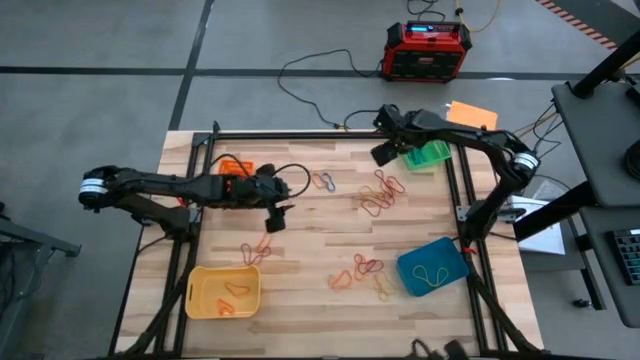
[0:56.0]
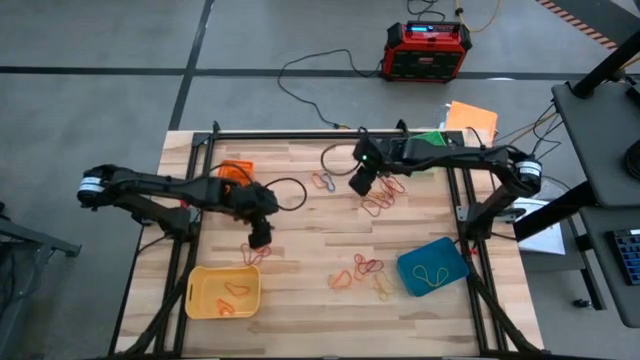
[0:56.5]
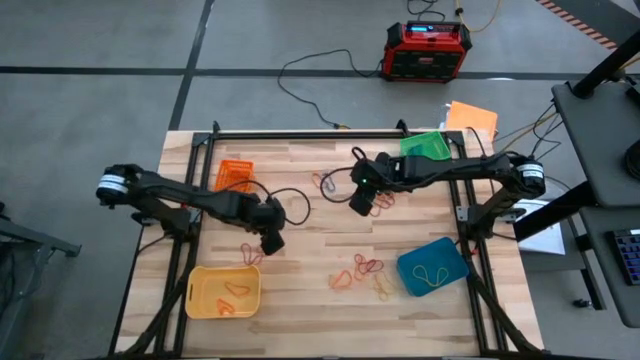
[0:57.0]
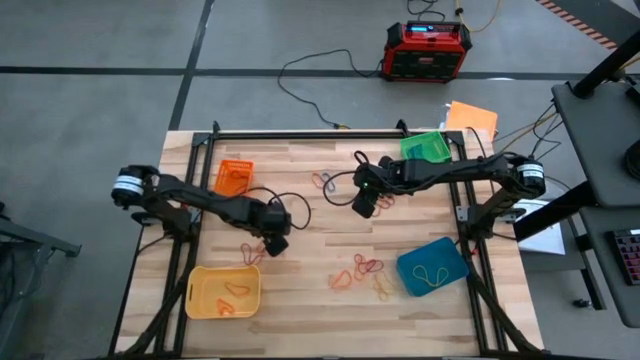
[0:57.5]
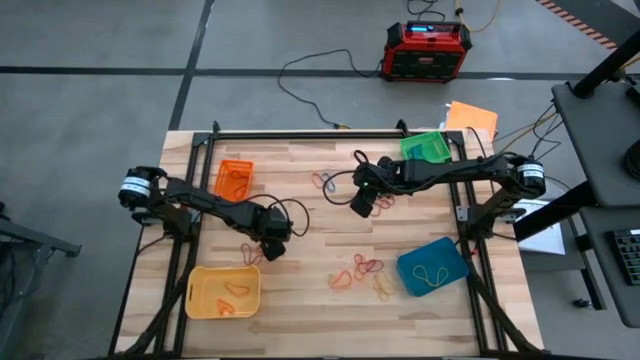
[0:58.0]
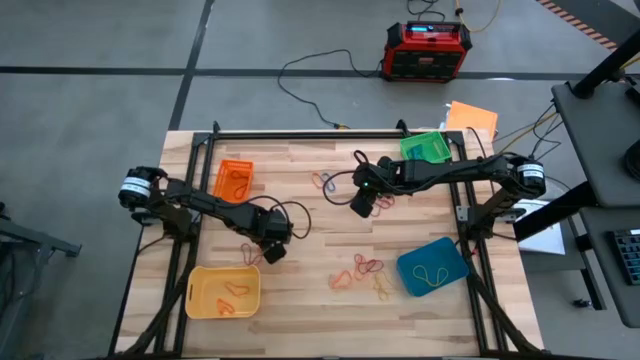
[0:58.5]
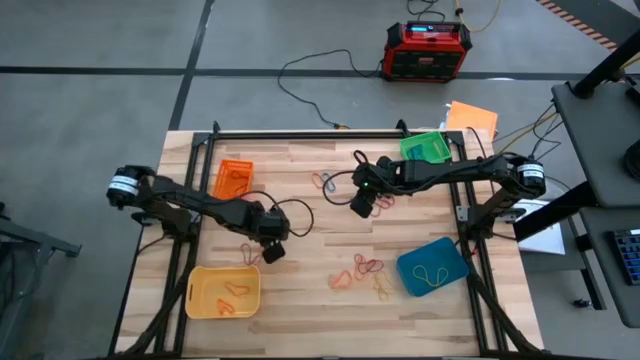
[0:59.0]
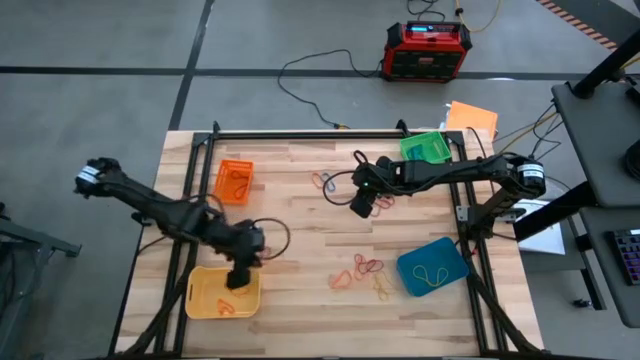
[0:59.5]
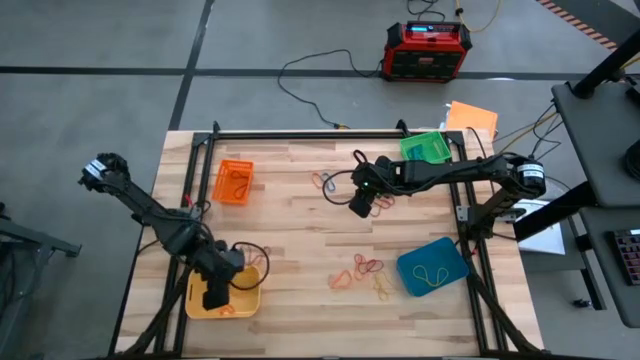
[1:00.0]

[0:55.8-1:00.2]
Task: Sort rubber bands into baskets
Put the orange rubber band into the yellow bin

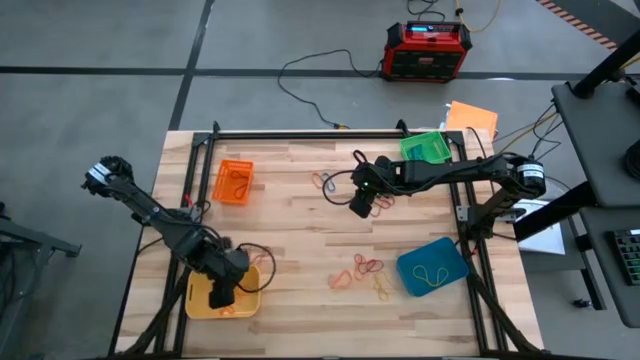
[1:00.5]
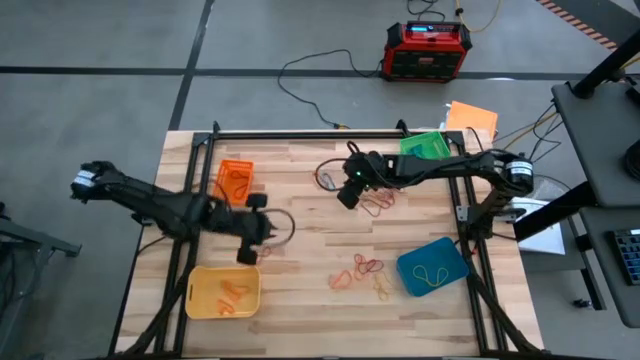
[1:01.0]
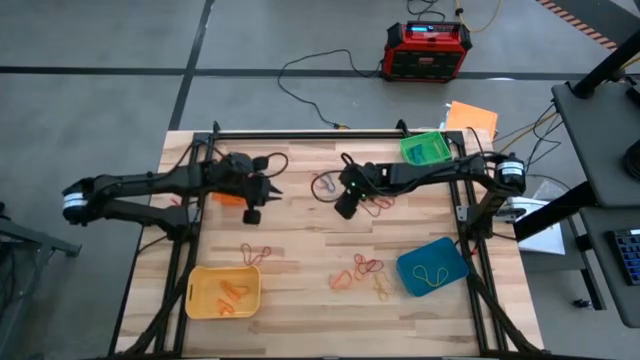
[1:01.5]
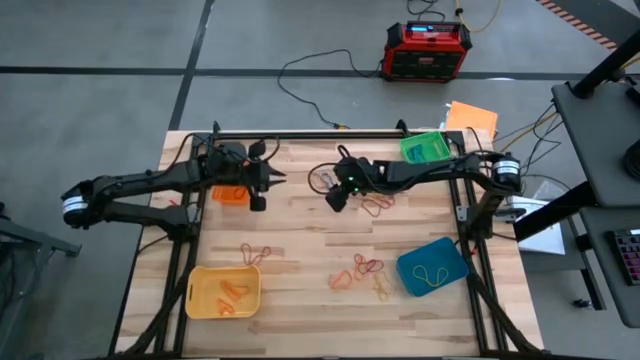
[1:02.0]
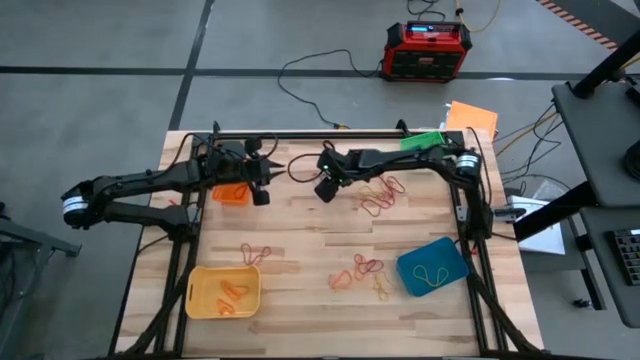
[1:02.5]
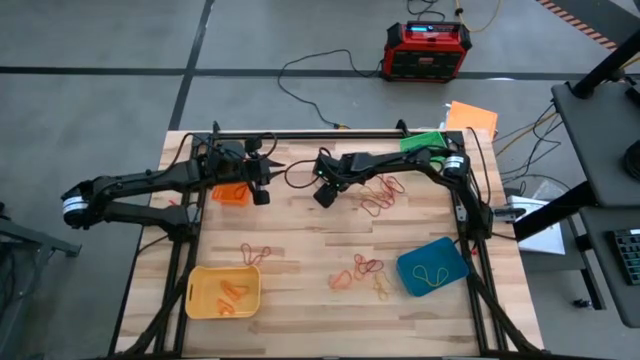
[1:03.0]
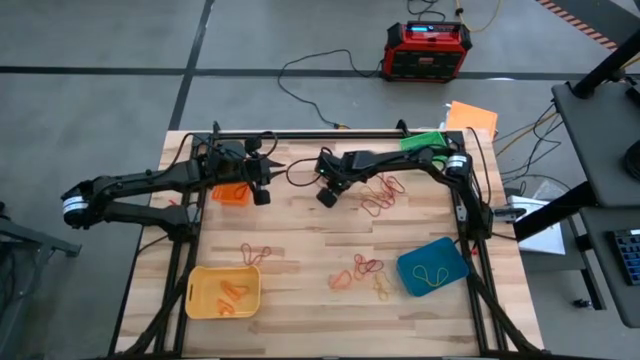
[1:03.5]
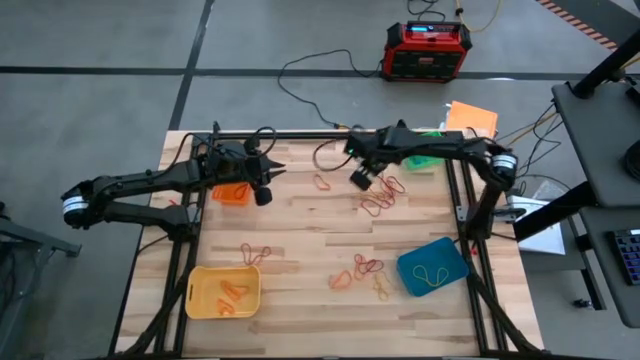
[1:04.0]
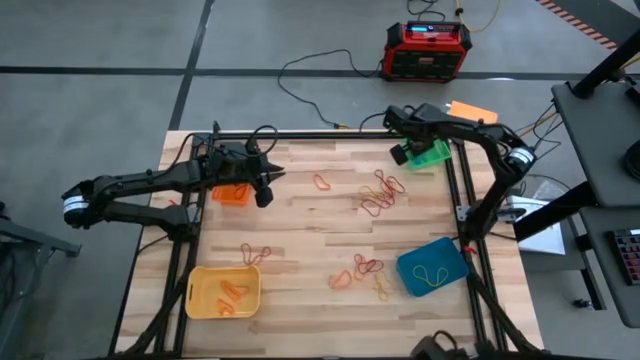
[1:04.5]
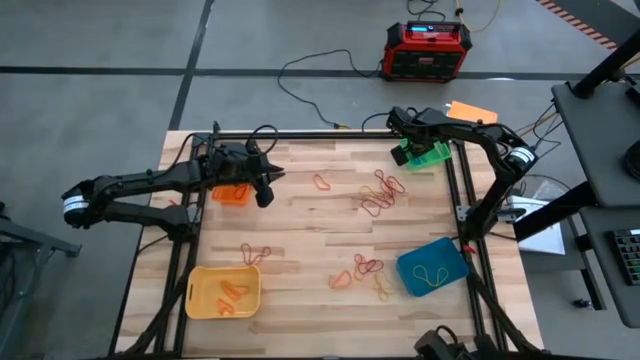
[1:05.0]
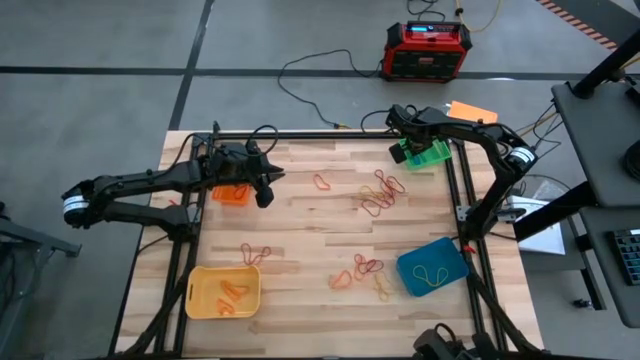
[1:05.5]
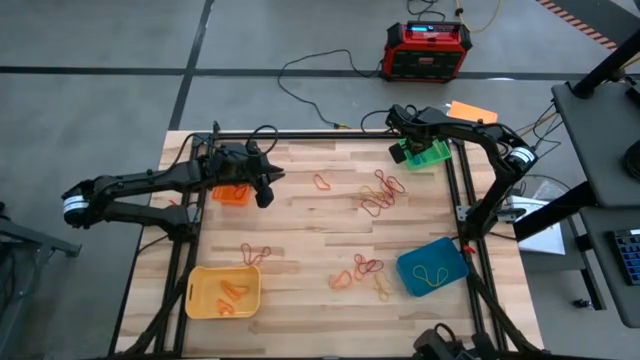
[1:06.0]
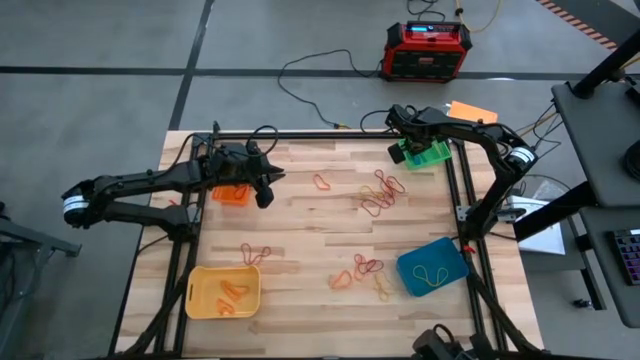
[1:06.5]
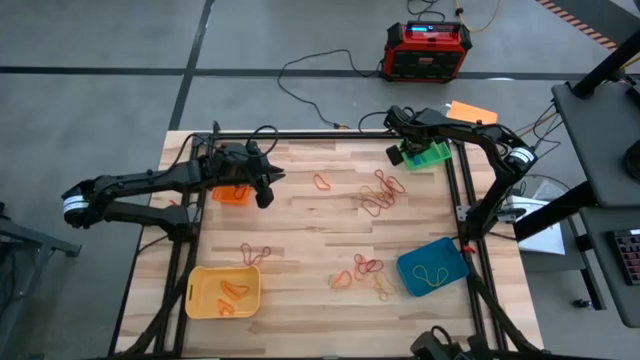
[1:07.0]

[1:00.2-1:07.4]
Put the blue rubber band into the green bin

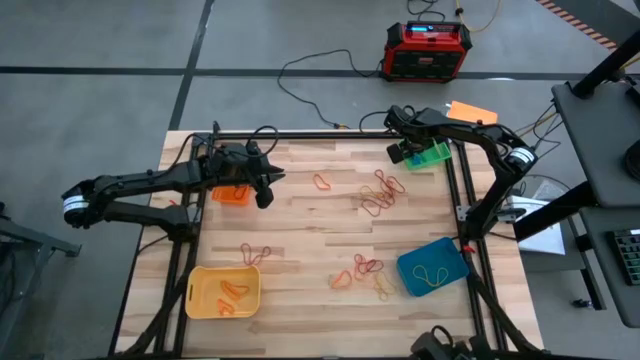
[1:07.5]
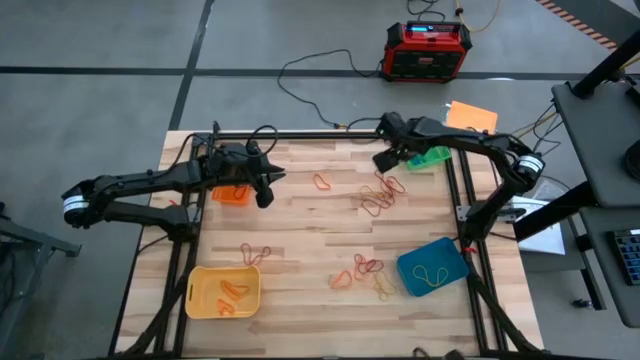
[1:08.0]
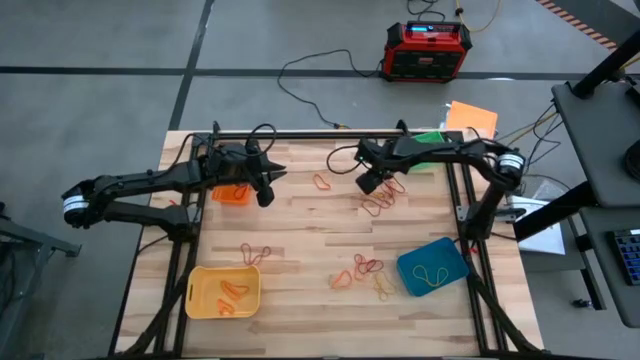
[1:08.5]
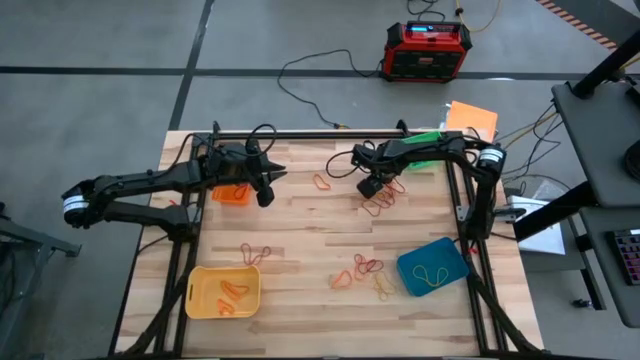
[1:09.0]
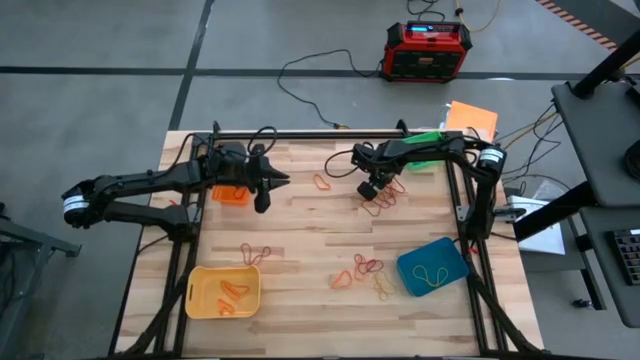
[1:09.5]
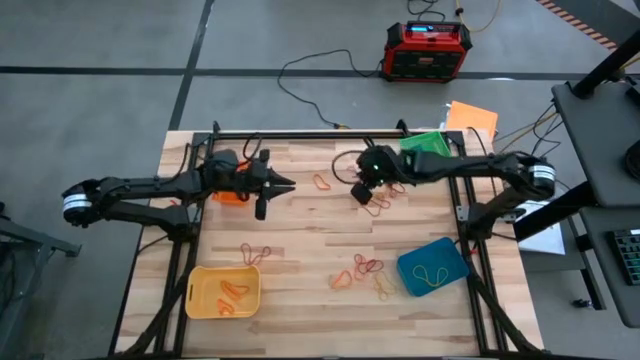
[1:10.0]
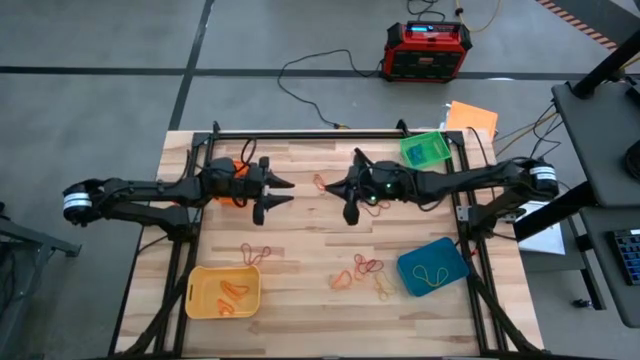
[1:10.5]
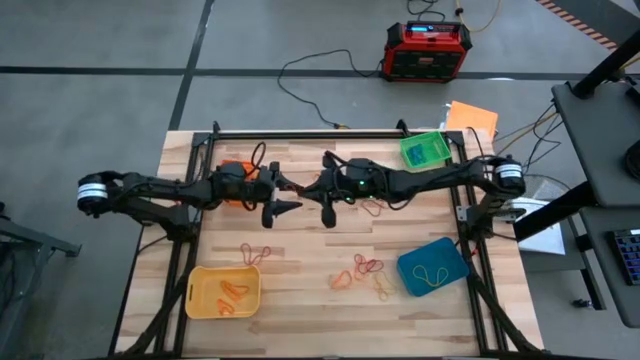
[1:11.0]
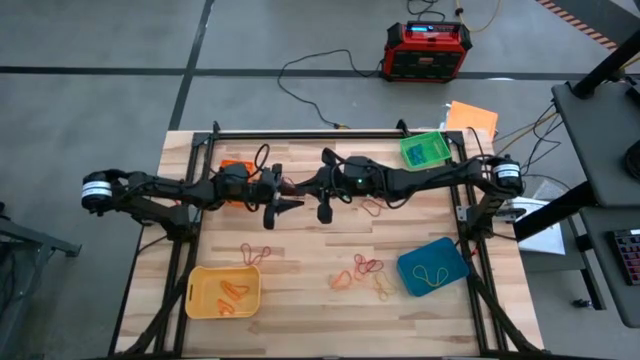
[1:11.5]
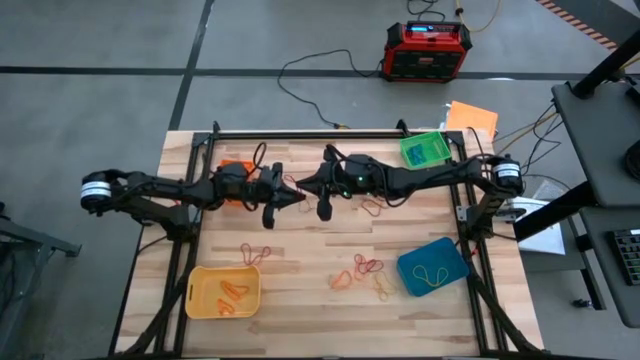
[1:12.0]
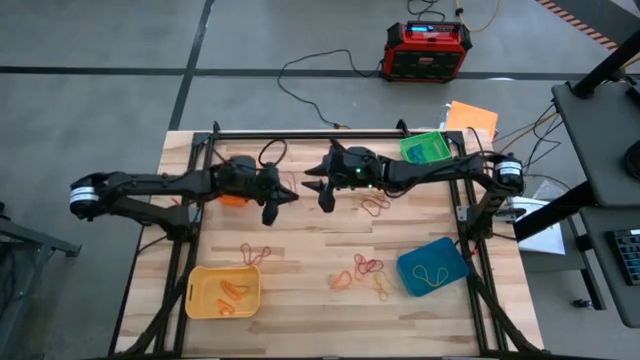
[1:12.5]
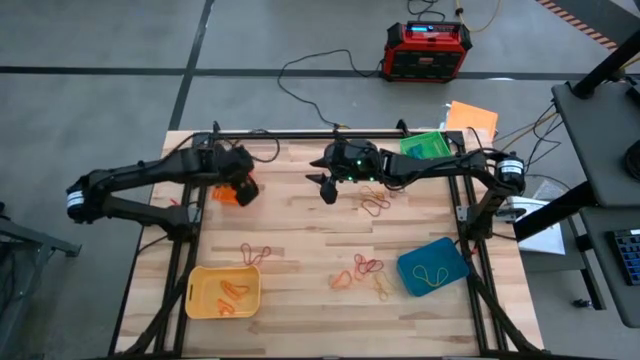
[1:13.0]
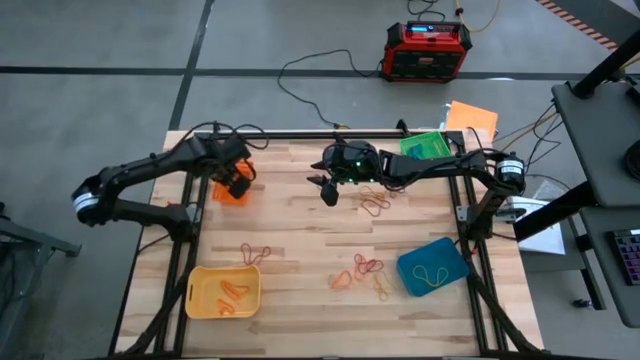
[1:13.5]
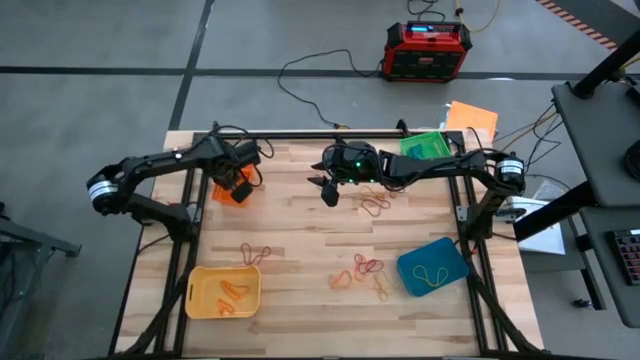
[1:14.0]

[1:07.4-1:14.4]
Put the red rubber band into the orange bin

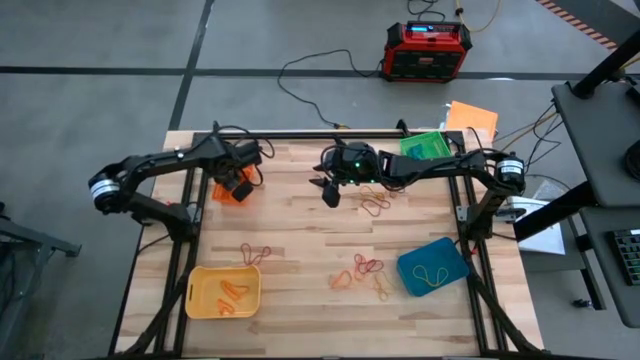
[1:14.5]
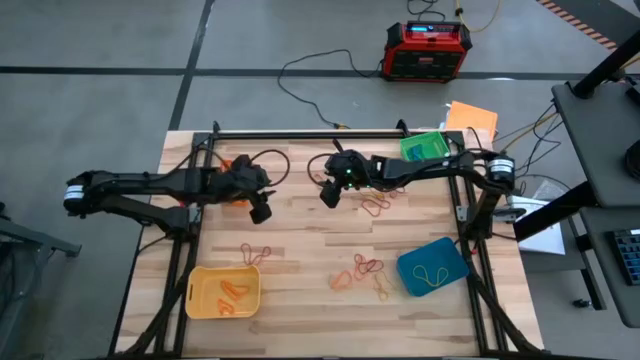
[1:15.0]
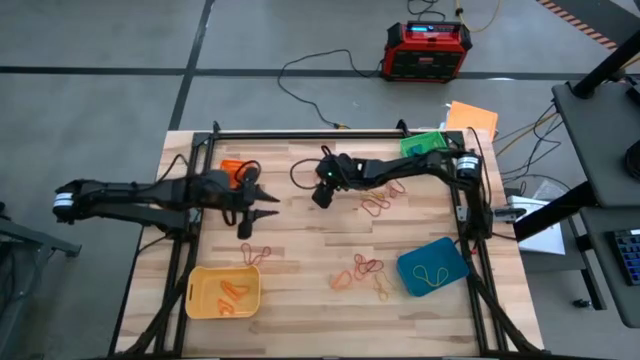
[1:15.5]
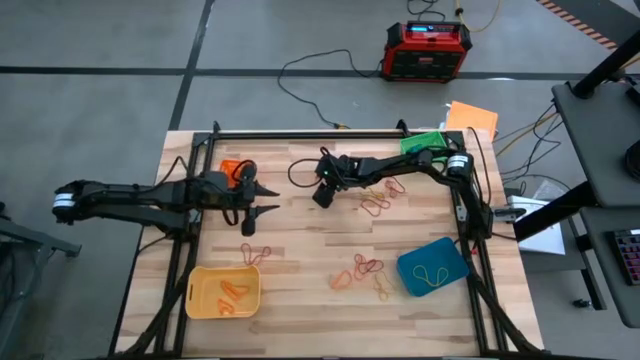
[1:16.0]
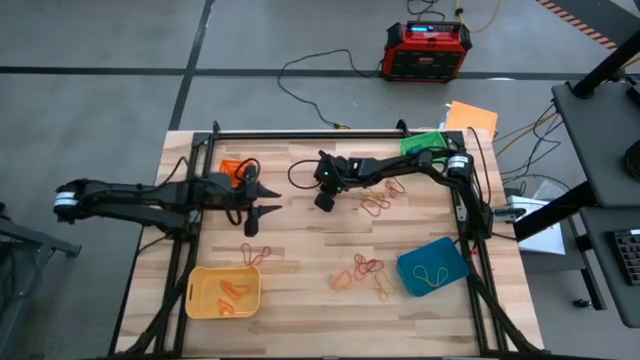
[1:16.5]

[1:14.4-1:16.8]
Put the orange rubber band into the yellow bin
